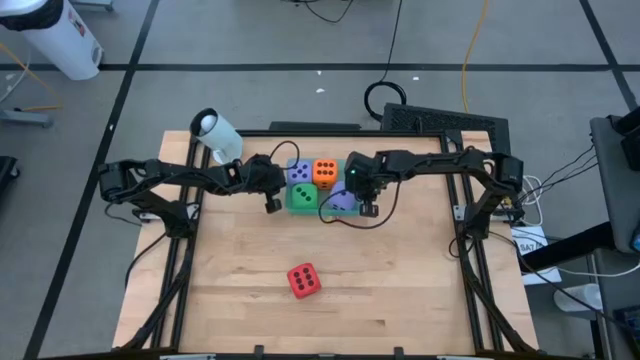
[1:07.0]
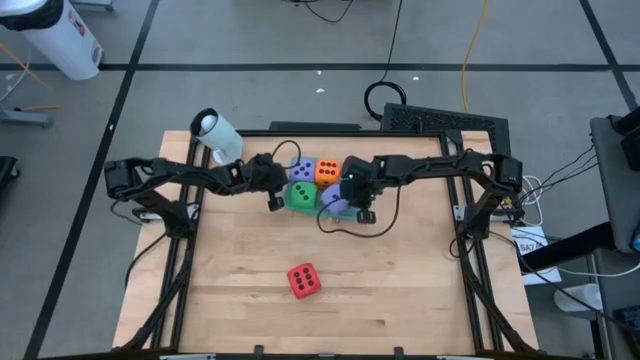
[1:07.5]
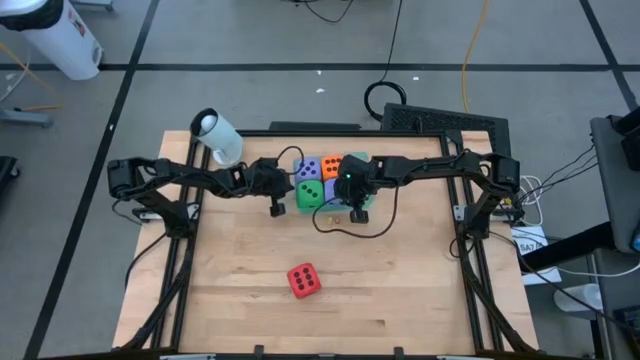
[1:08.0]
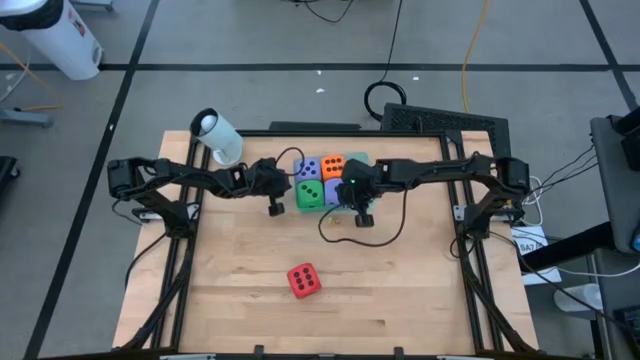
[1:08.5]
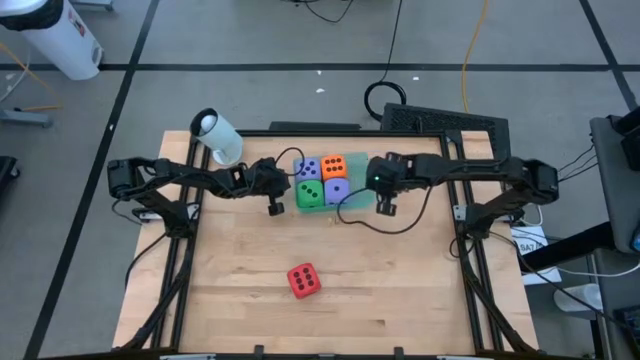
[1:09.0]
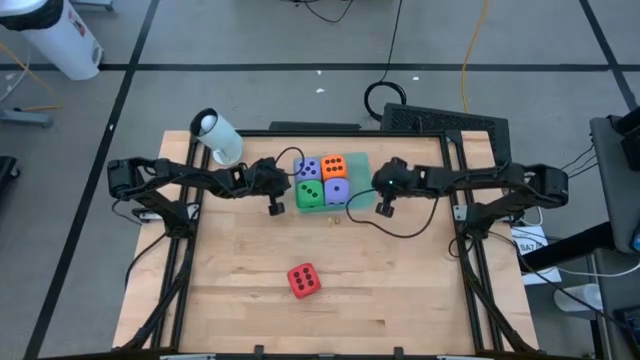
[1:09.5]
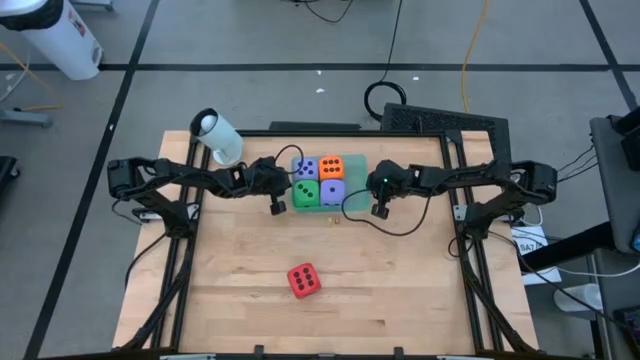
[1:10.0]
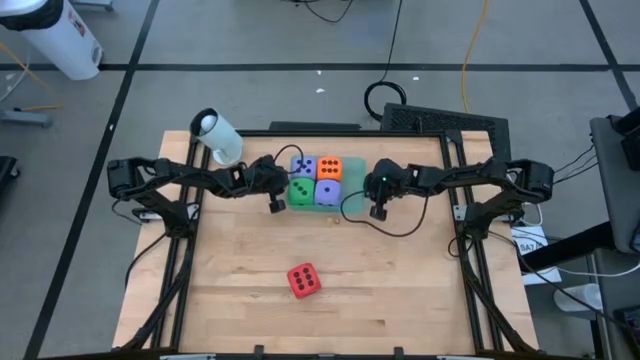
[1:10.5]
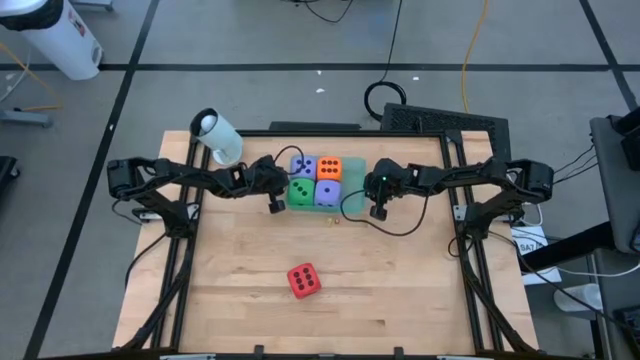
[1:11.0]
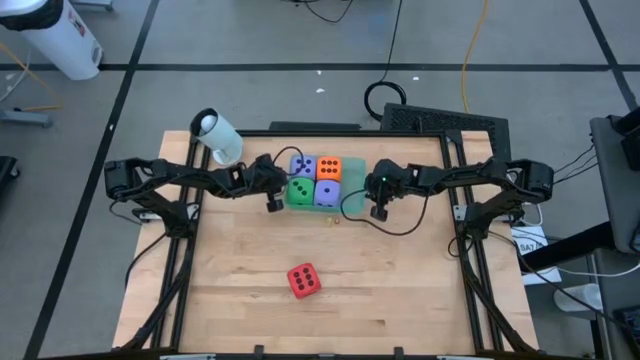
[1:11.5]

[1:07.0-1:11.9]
Task: Pick & Place Dice
Adjust the blue bin

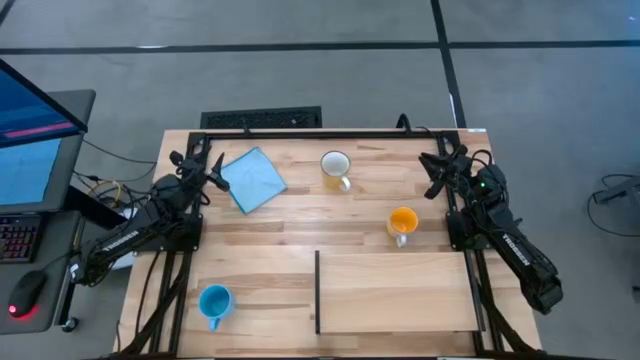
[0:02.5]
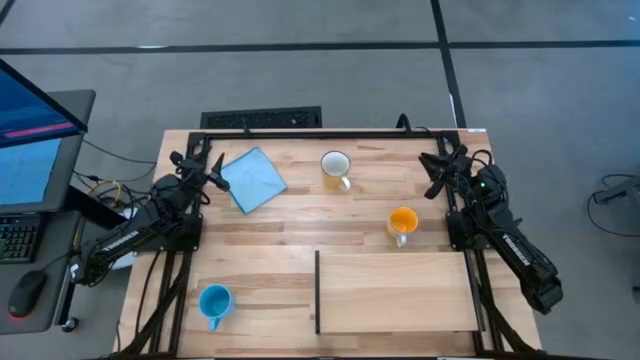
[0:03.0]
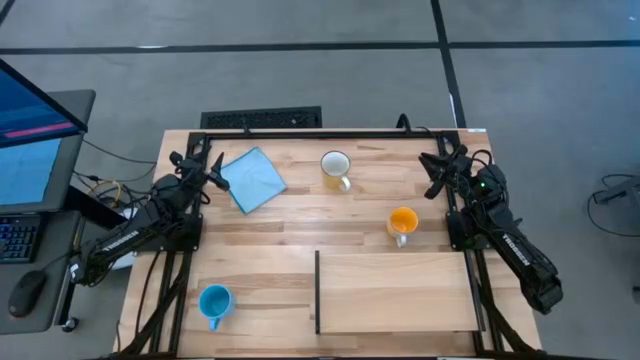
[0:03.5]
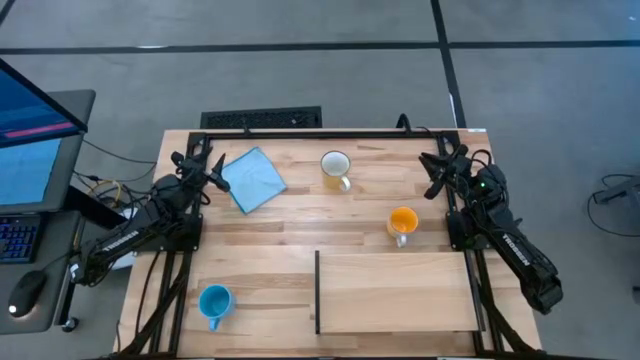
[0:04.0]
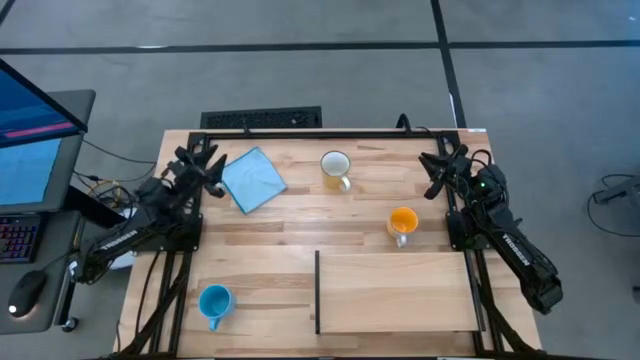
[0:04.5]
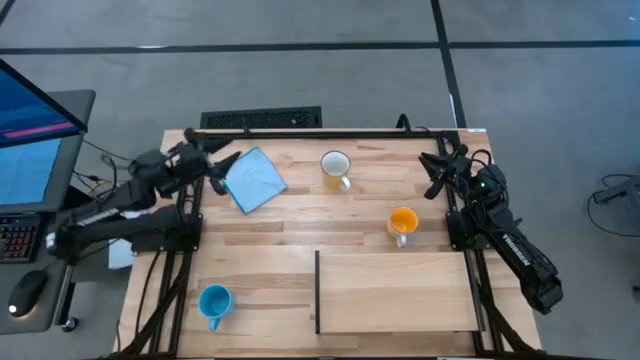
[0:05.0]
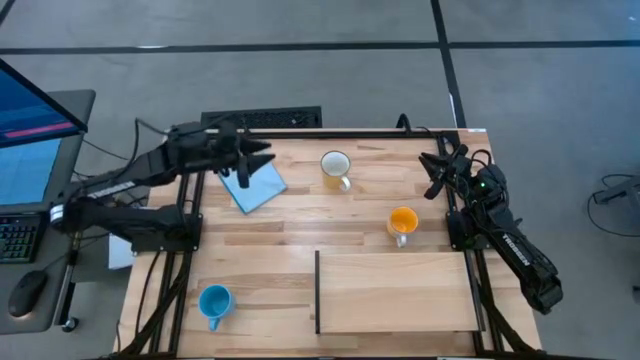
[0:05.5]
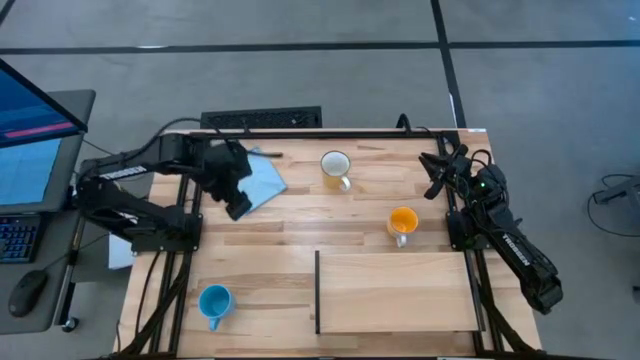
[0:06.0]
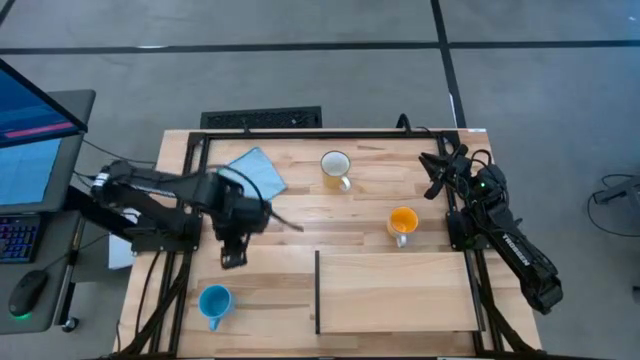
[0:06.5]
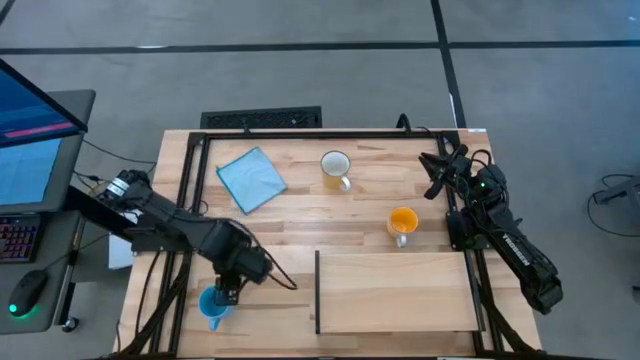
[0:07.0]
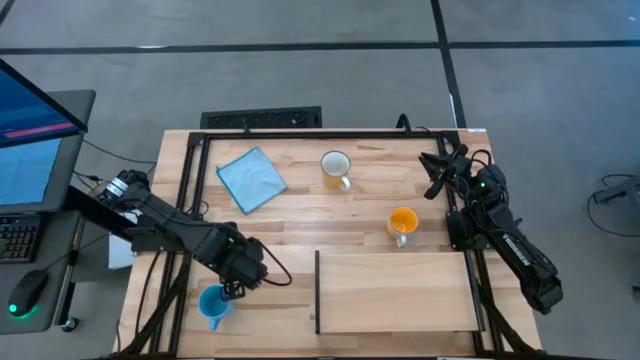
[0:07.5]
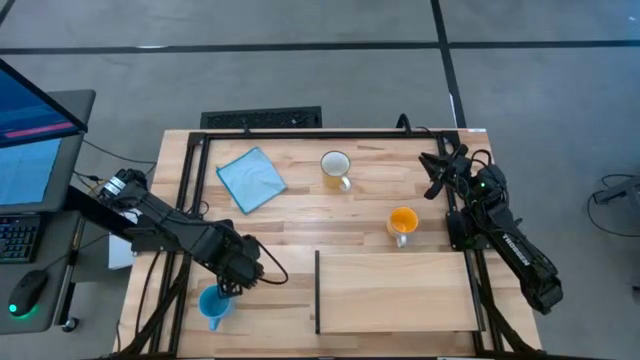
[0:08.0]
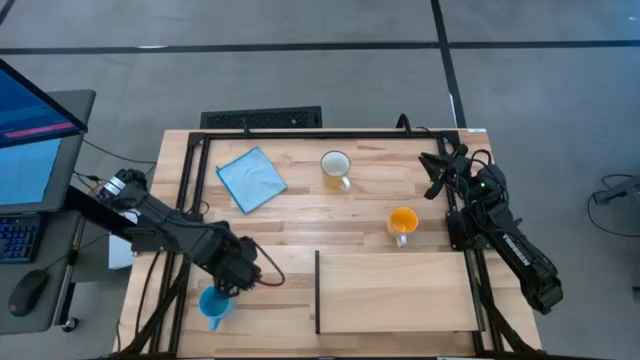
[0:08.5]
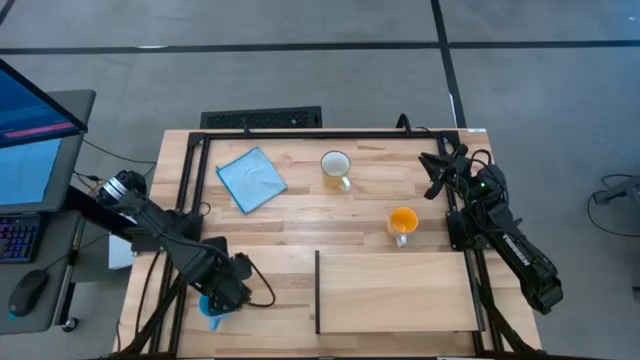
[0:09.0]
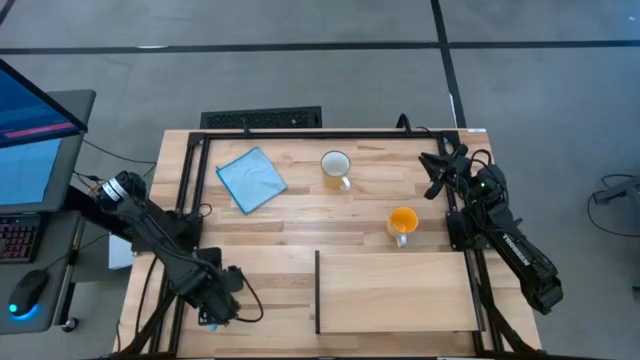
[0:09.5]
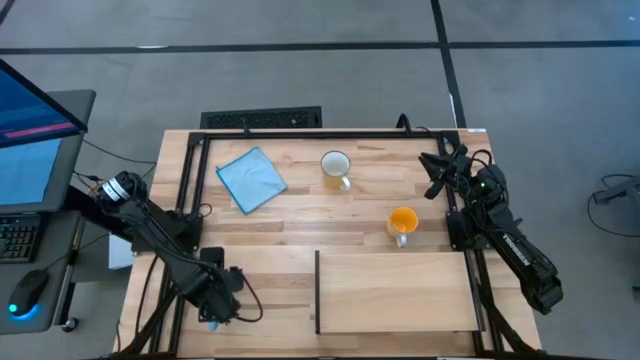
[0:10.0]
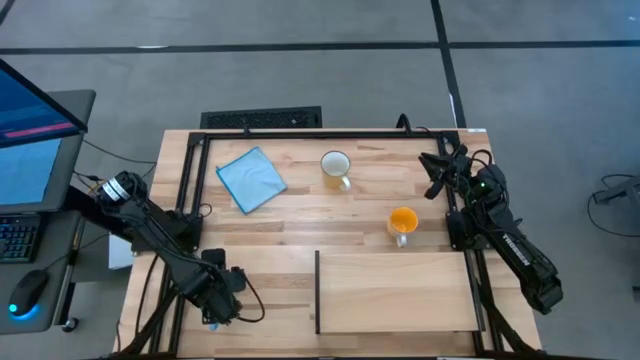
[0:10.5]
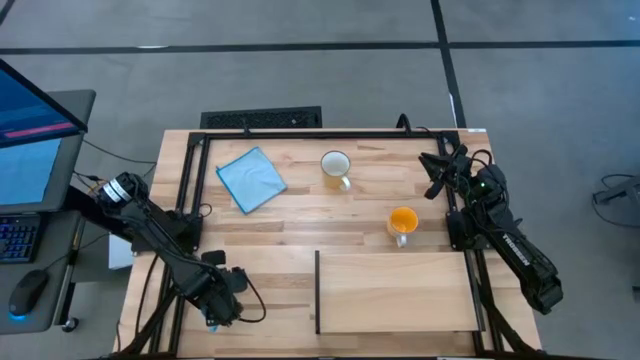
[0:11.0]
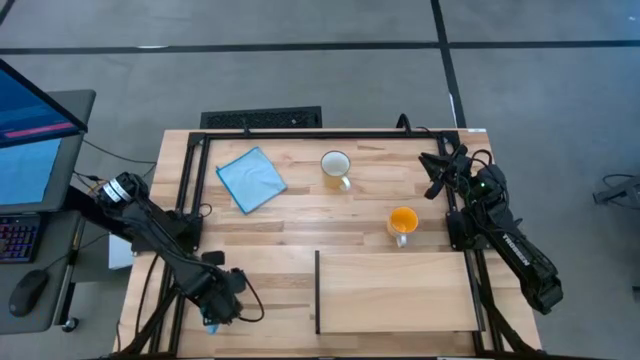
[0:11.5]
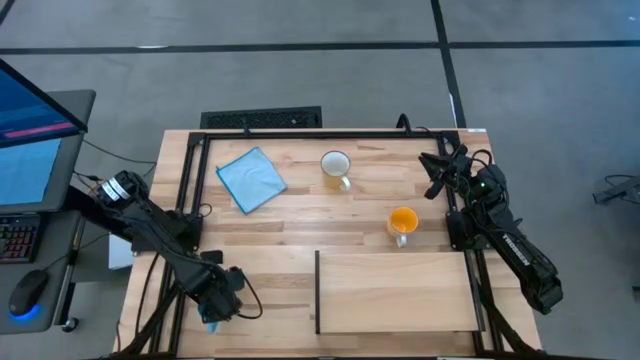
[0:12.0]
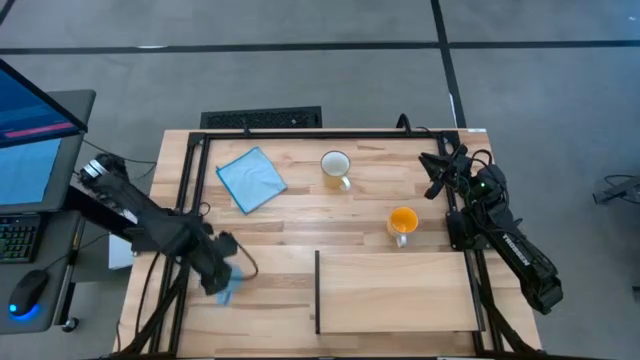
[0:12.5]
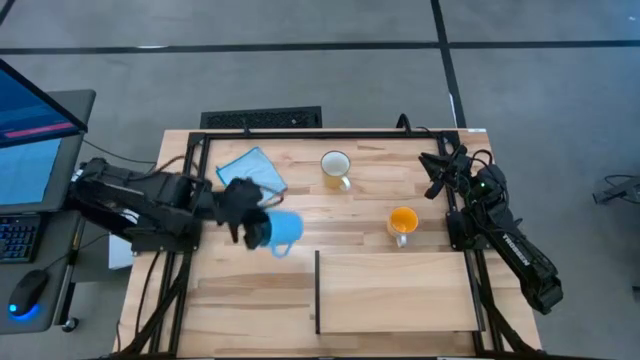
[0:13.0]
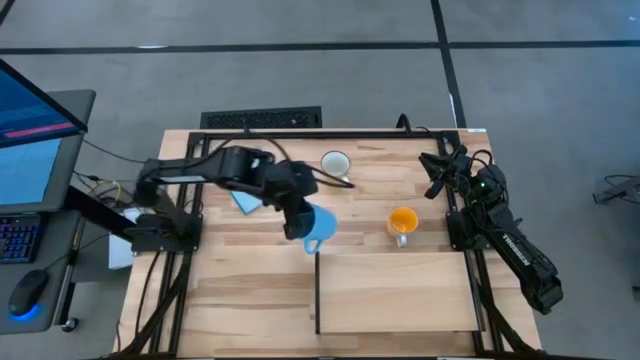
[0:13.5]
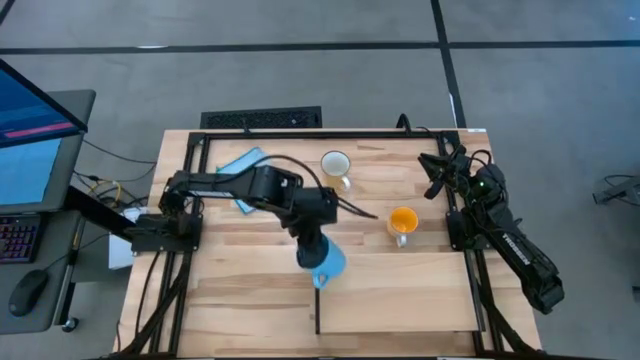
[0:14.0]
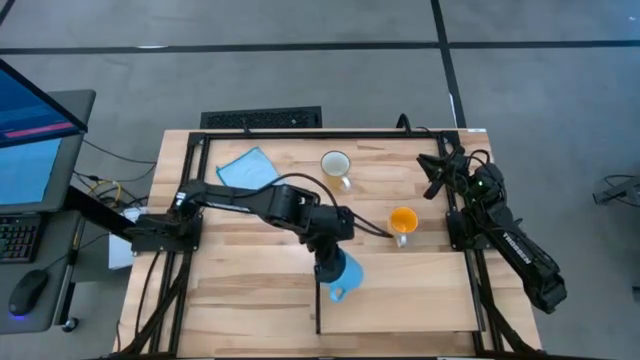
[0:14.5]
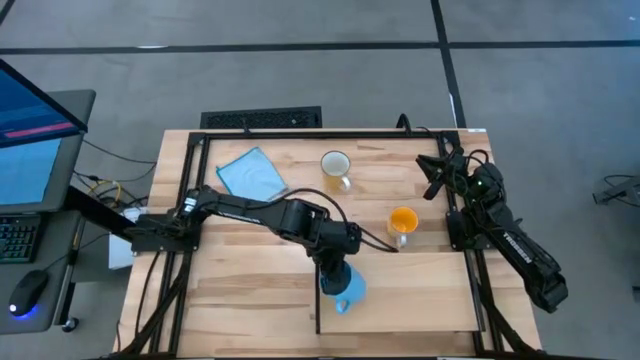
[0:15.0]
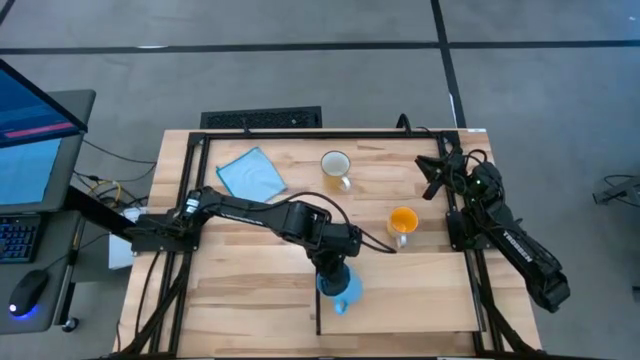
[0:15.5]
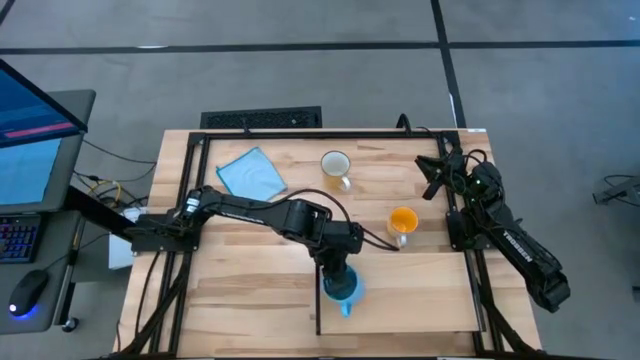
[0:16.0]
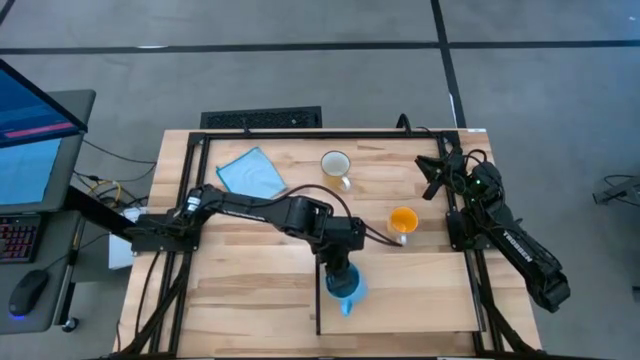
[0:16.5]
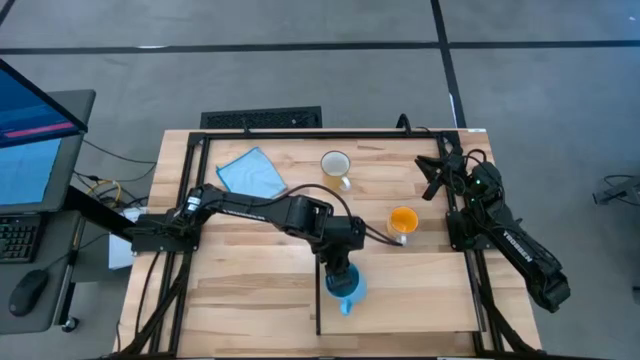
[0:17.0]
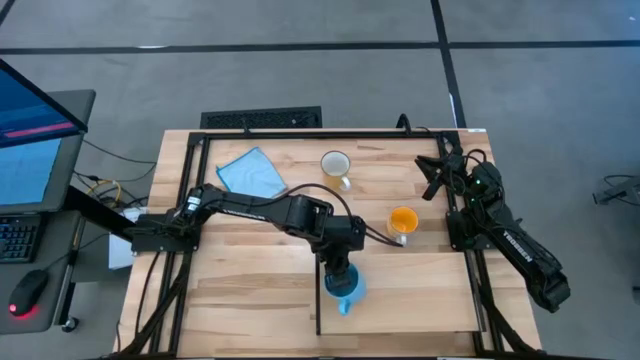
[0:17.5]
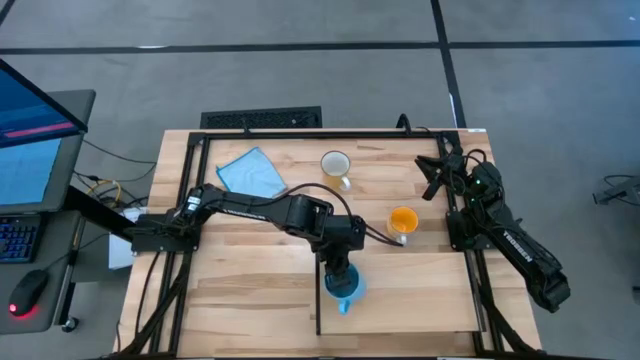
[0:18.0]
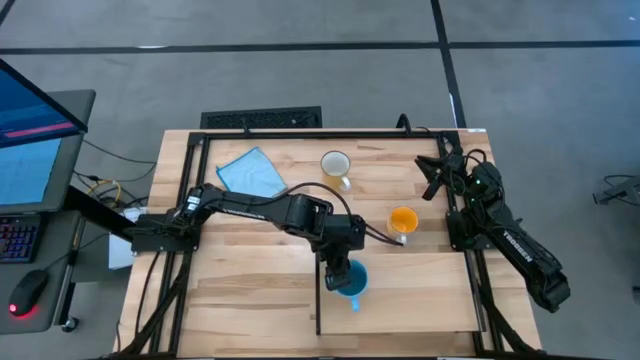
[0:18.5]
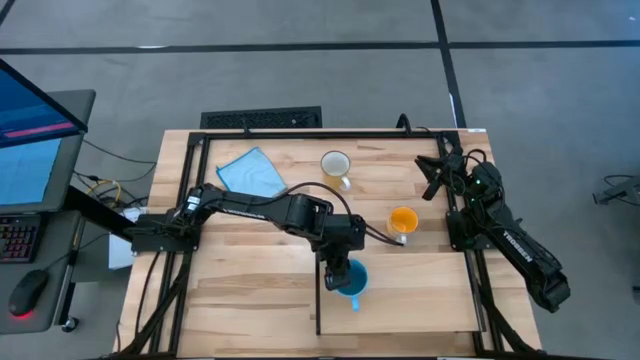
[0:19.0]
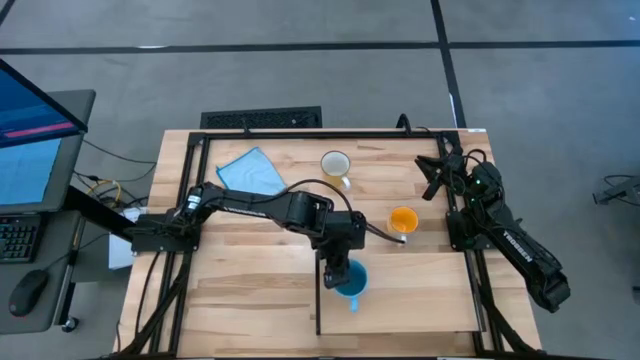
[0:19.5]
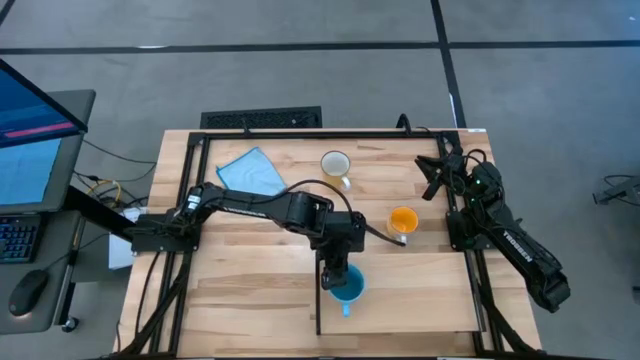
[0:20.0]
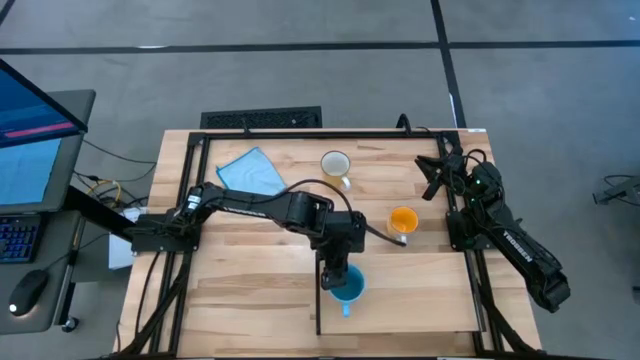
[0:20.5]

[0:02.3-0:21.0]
Task: Stack small to large cups/mugs on shelf
Put the blue mug on the shelf
